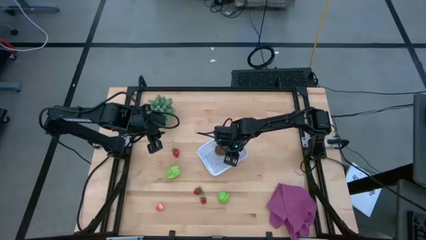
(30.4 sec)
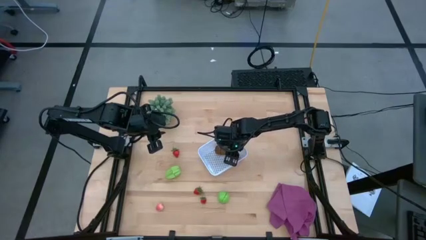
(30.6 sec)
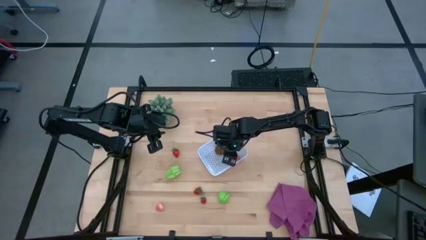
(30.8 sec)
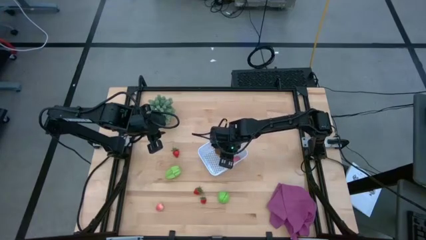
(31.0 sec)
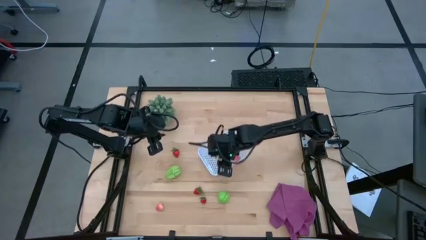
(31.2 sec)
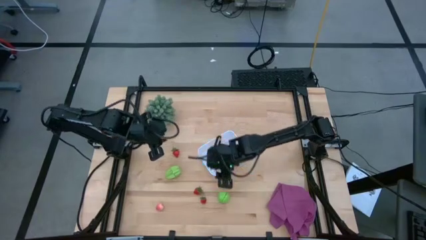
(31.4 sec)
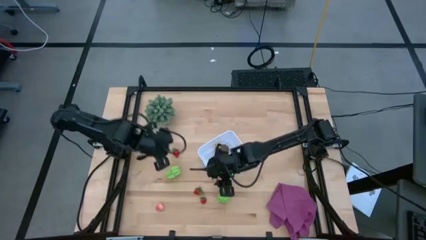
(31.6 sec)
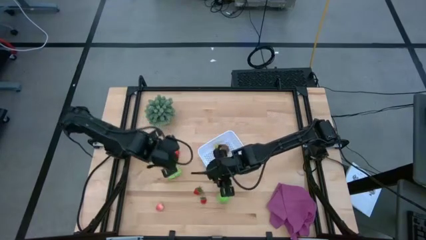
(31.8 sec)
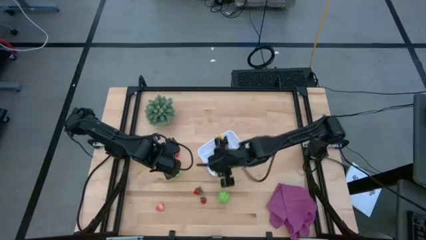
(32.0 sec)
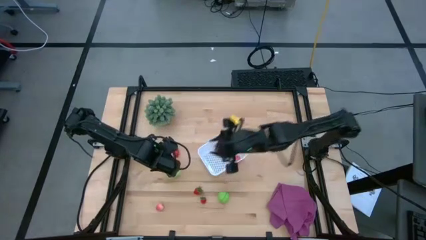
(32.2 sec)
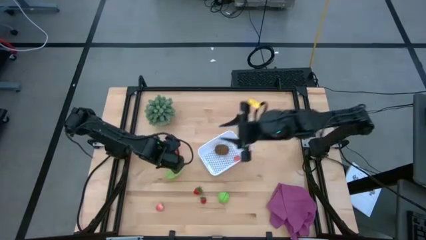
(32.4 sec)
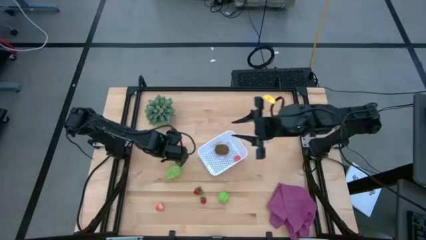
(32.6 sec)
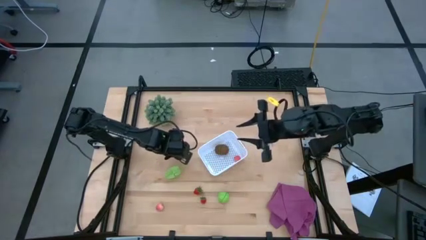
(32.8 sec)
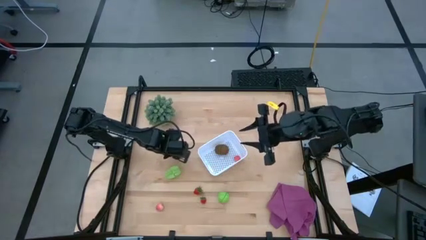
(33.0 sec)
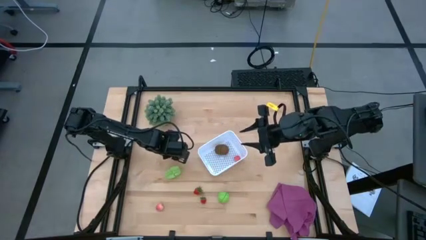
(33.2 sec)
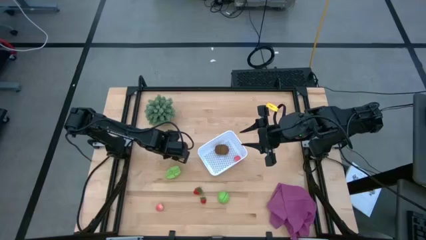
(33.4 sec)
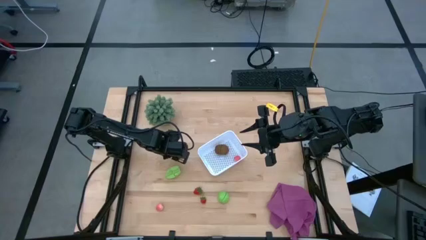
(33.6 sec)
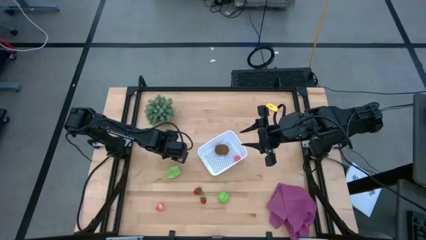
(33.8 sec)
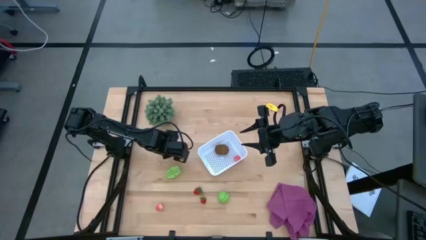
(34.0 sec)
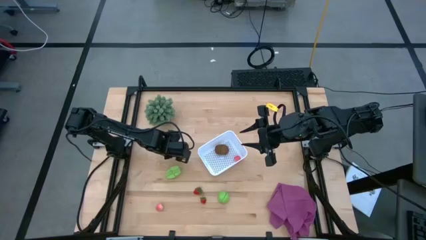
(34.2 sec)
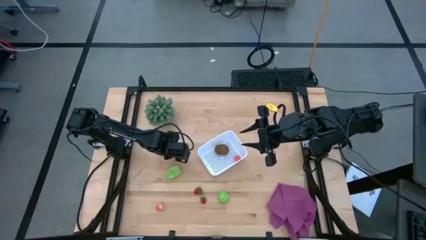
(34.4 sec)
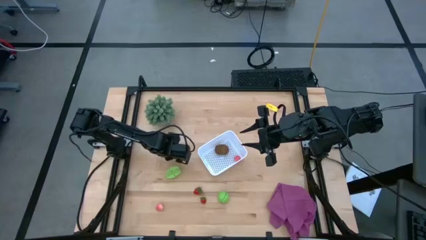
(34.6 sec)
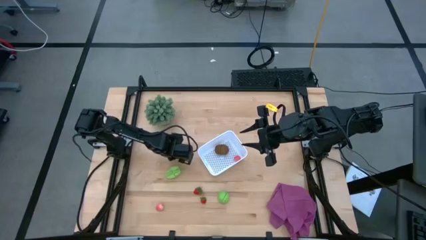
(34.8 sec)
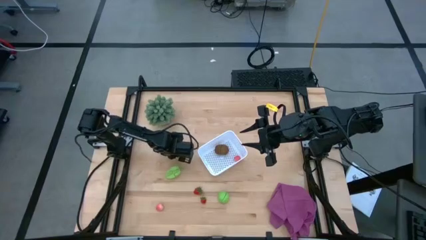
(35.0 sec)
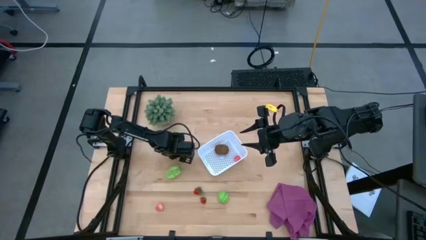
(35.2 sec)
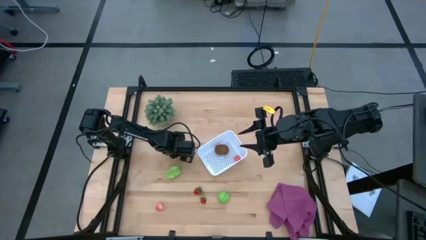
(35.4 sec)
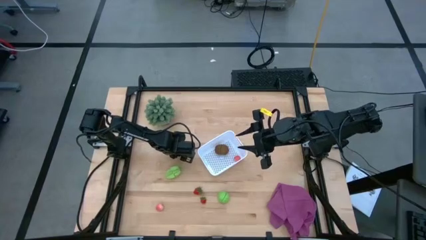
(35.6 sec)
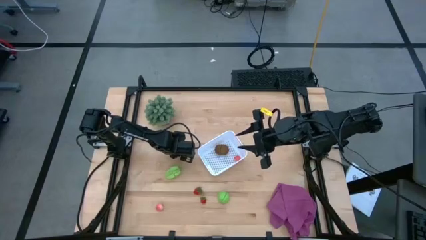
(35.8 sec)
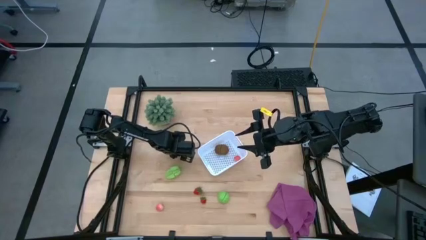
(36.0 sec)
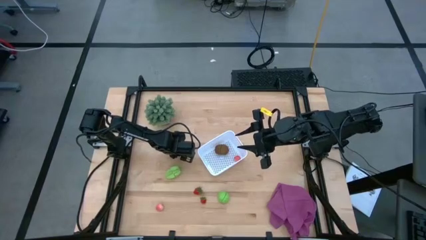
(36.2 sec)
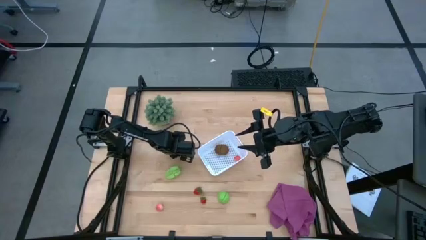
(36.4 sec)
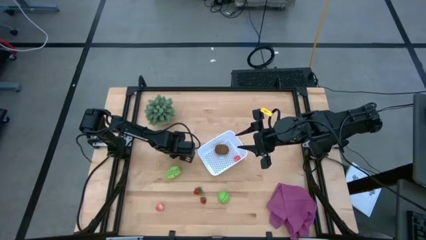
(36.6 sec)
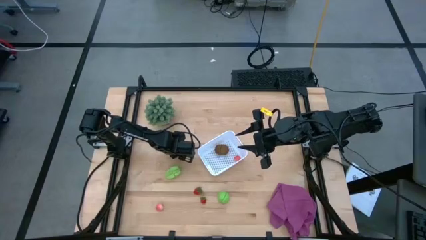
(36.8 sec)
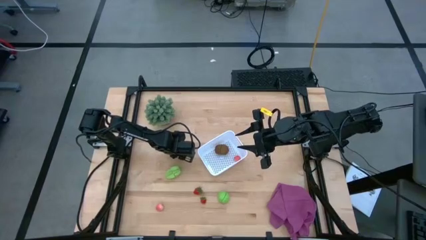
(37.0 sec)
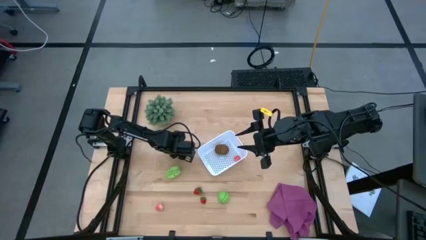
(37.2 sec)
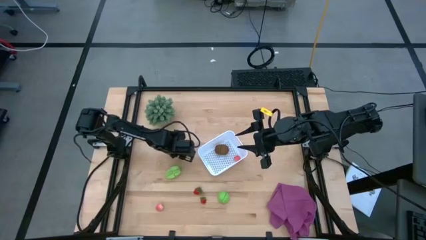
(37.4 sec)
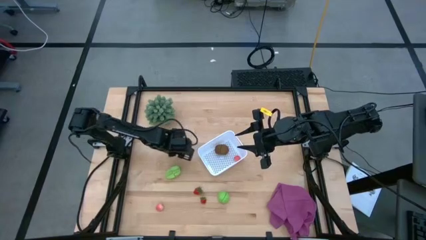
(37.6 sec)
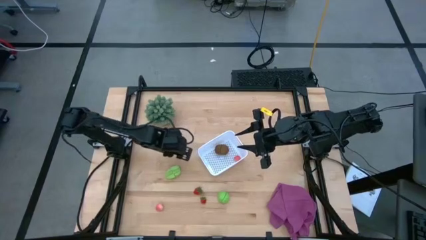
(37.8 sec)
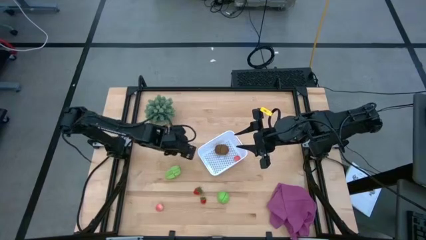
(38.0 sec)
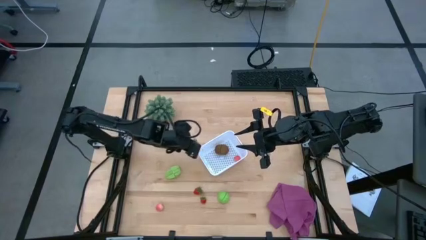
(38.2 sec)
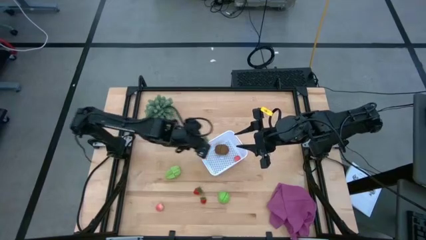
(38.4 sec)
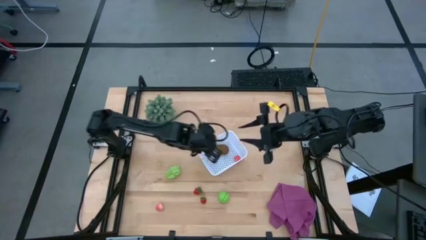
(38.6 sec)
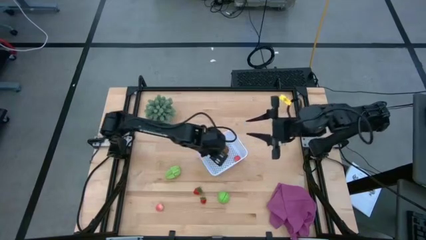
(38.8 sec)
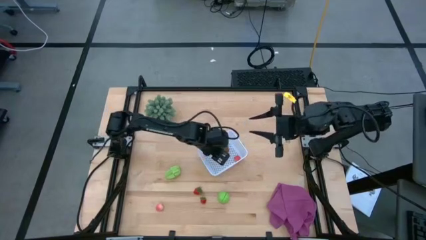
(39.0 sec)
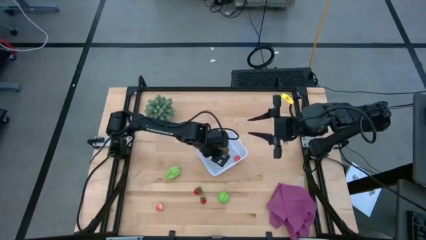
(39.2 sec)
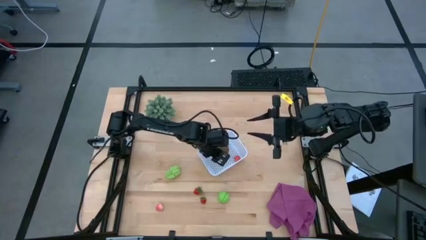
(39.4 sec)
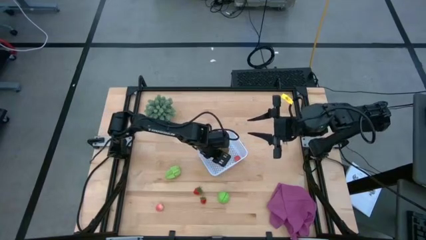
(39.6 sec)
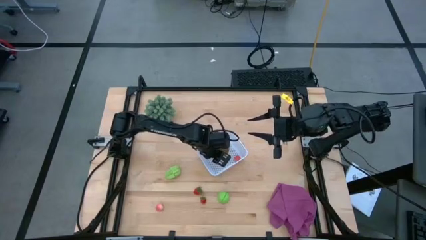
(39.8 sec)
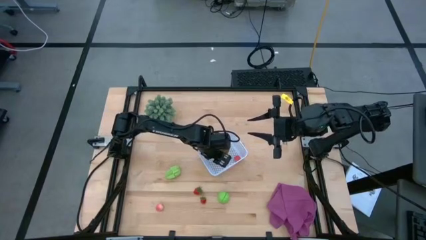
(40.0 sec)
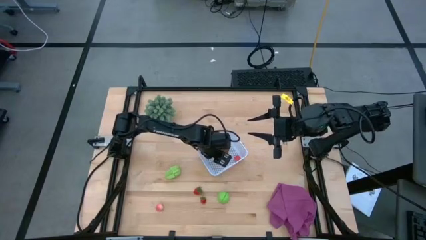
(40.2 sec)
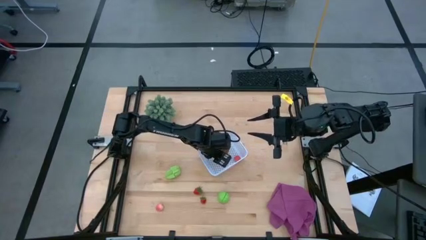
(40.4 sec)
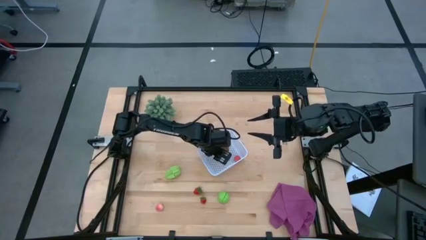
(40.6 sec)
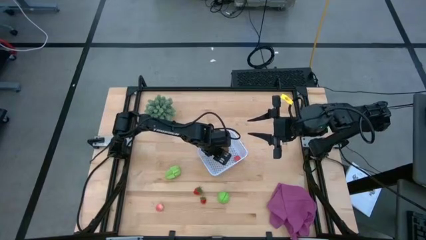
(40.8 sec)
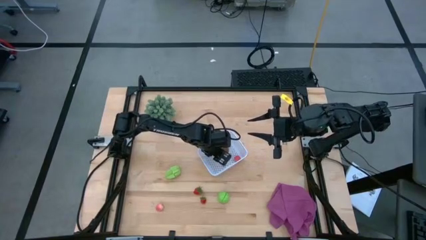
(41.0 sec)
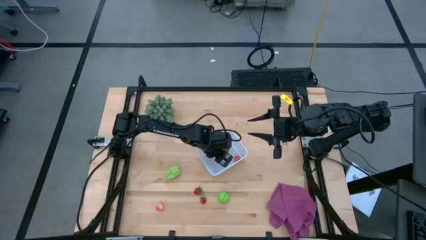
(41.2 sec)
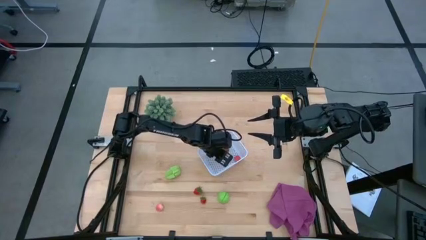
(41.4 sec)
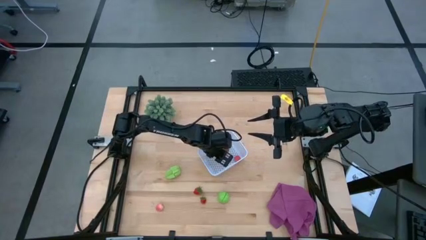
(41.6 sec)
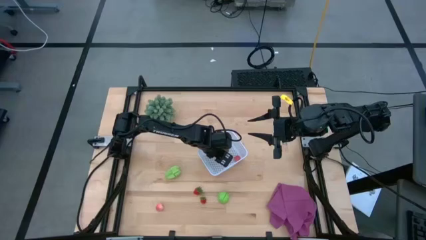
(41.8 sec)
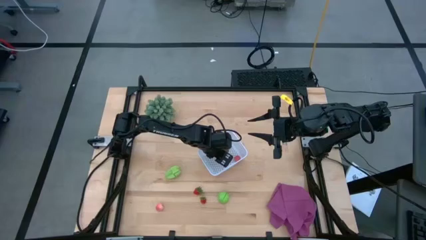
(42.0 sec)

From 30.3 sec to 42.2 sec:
Task: Pick and placing Produce into tupperware
Put the top strawberry into the white bin

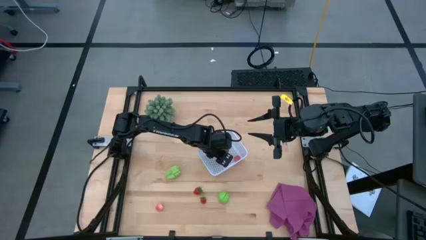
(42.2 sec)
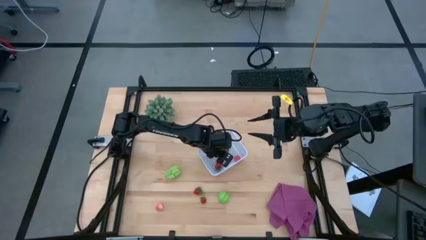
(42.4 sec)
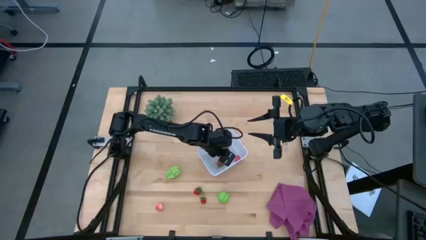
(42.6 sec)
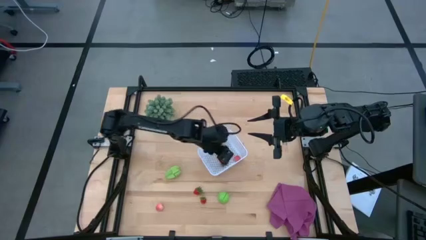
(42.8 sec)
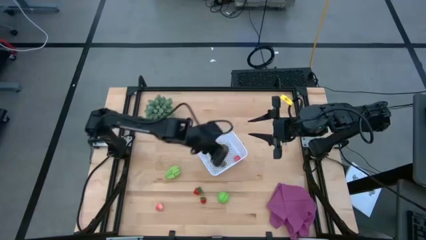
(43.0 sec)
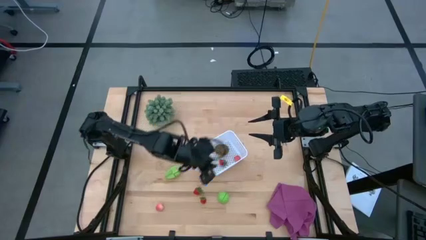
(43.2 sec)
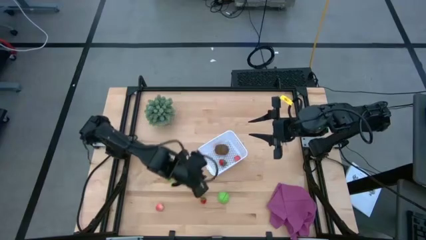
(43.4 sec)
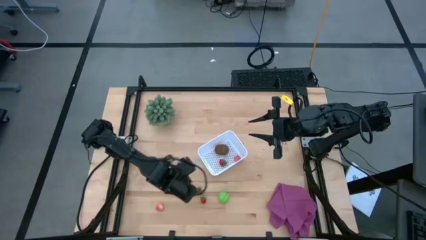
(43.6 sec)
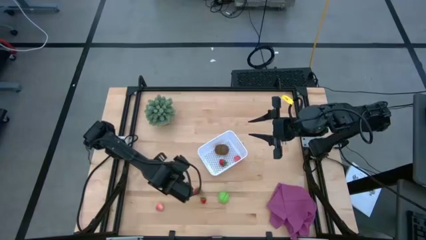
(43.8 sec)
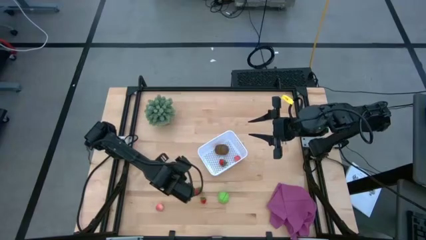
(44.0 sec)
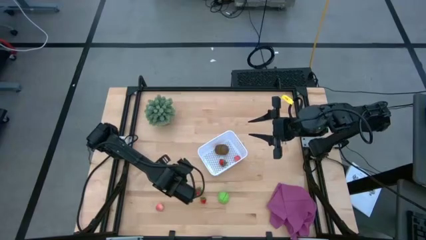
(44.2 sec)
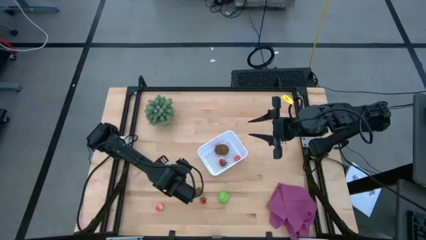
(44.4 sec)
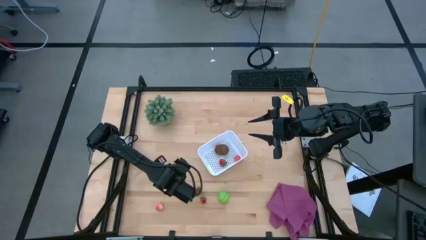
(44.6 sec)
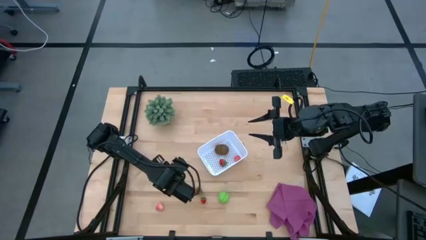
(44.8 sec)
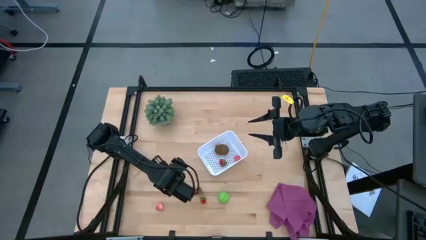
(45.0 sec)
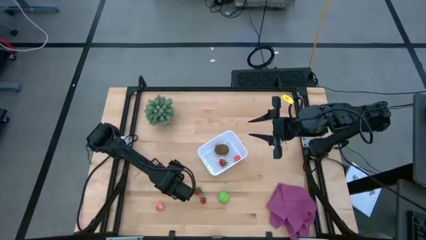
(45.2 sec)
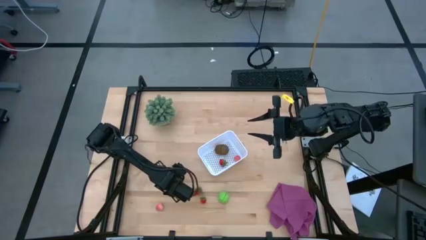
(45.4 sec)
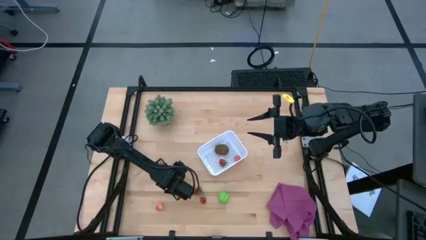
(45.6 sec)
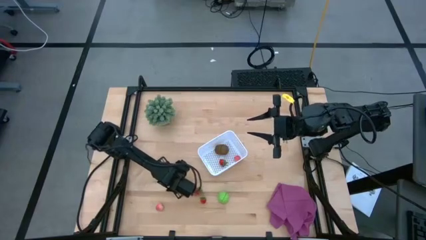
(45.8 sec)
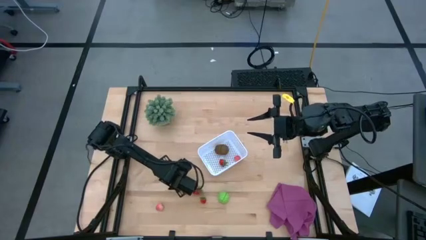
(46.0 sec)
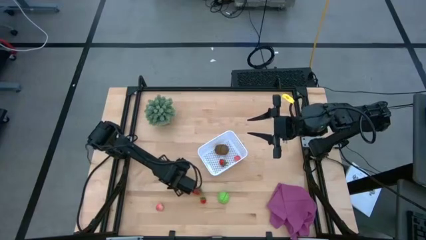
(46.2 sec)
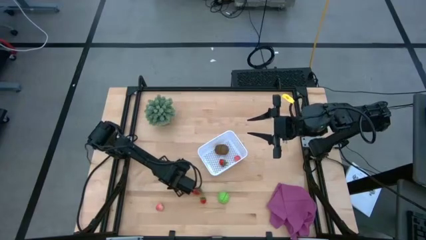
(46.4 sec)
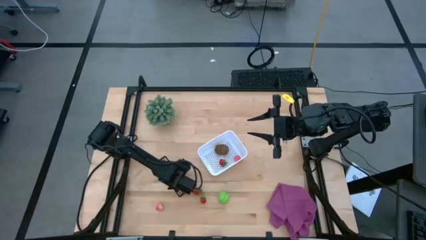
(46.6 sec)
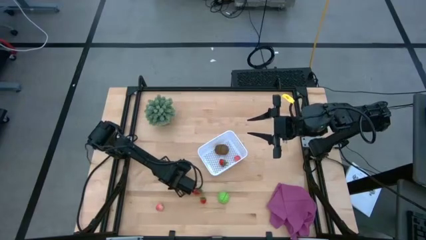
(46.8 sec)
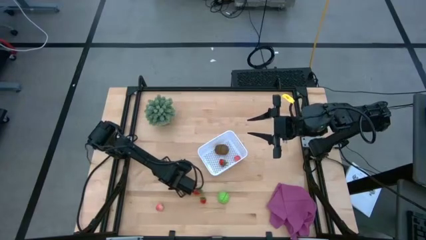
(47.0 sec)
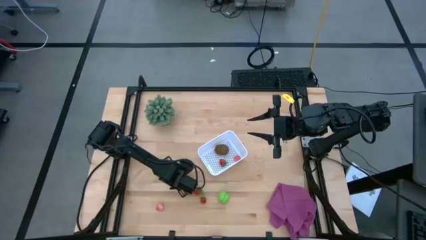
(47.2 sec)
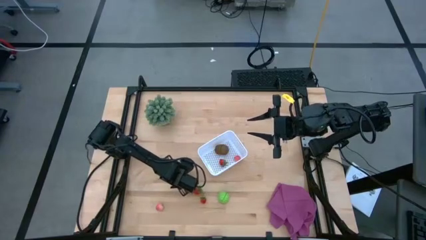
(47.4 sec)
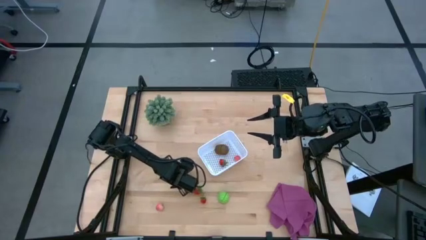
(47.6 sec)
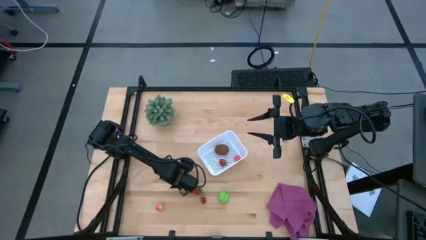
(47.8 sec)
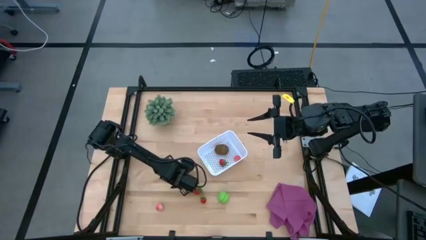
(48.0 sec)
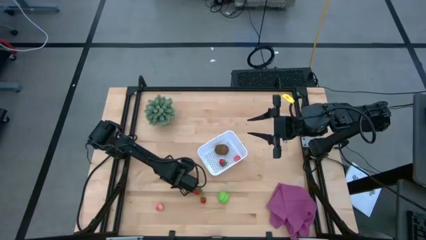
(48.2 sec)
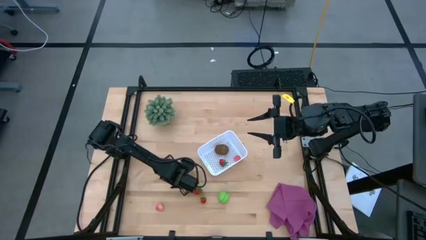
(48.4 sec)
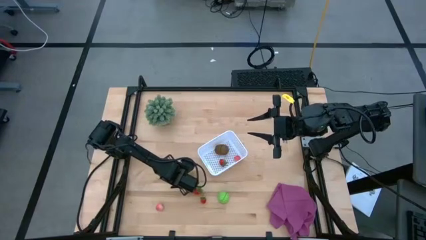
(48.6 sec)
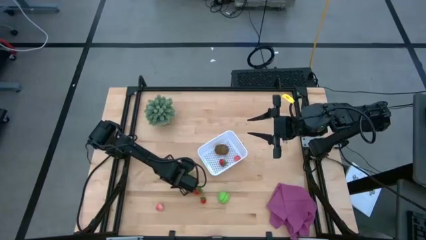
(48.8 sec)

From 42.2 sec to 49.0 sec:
Put the starfruit into the white bin
